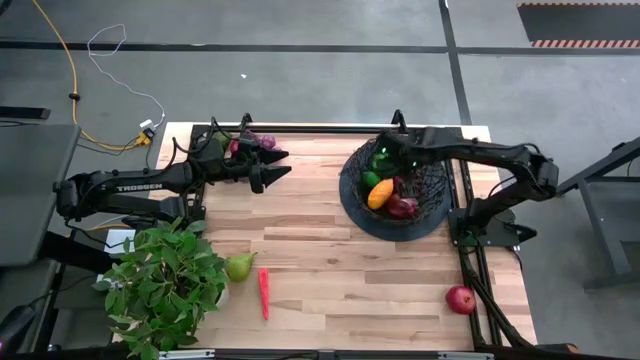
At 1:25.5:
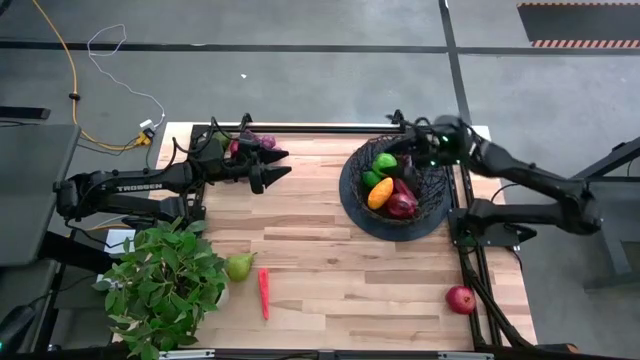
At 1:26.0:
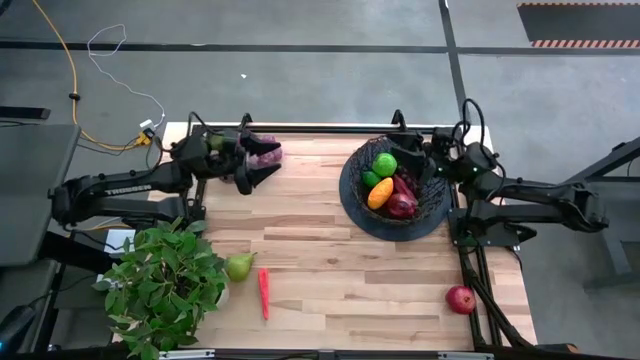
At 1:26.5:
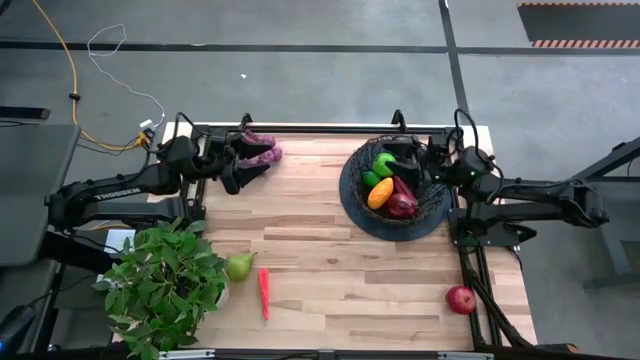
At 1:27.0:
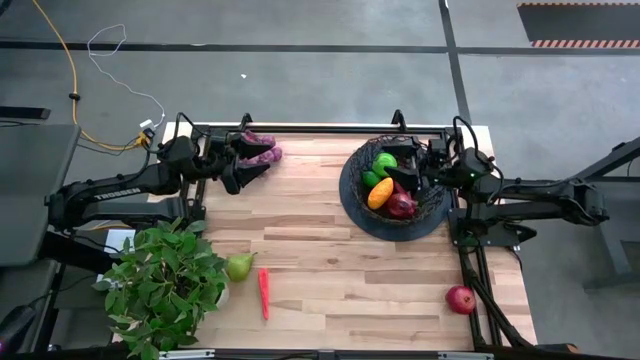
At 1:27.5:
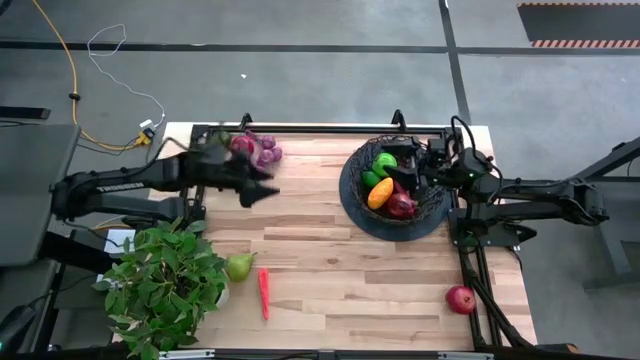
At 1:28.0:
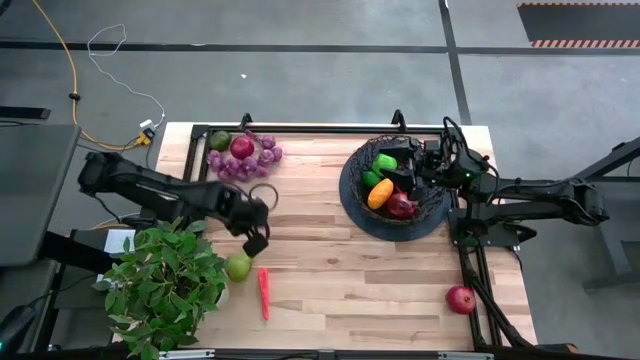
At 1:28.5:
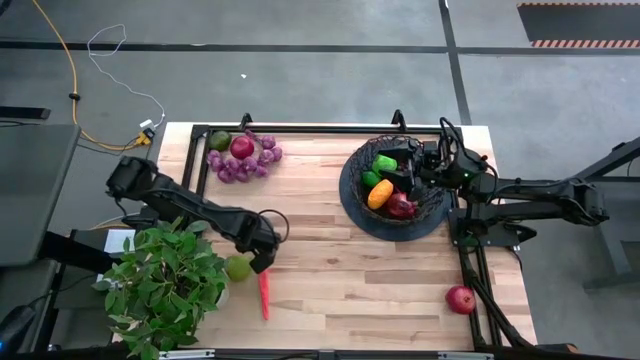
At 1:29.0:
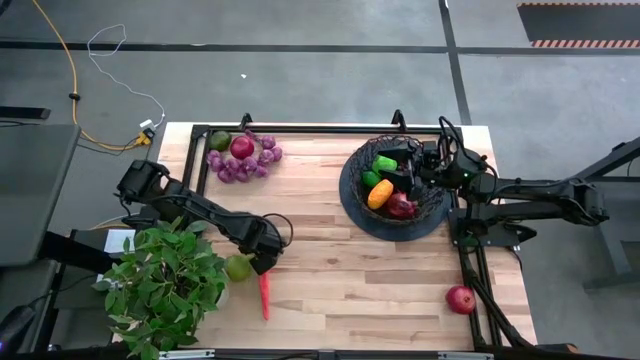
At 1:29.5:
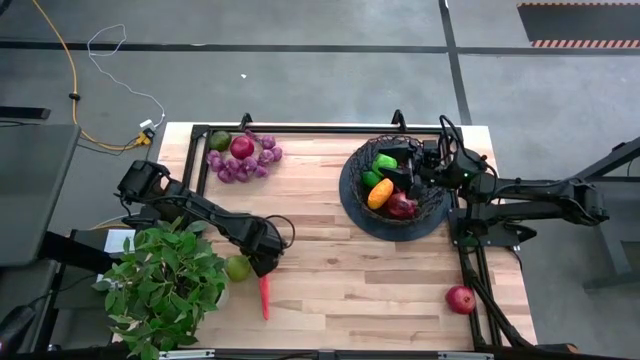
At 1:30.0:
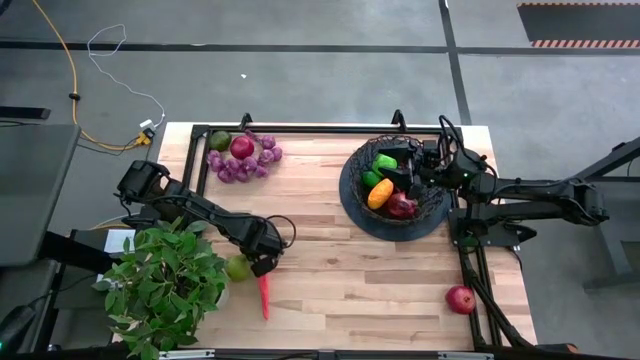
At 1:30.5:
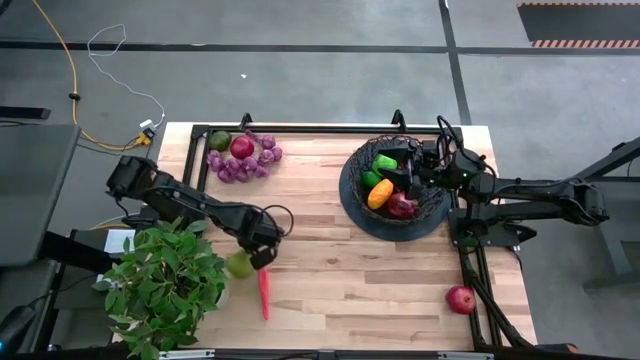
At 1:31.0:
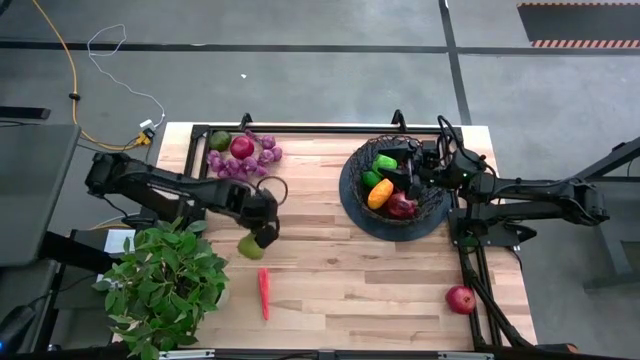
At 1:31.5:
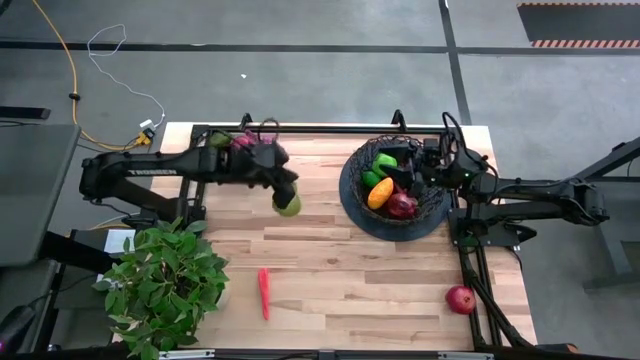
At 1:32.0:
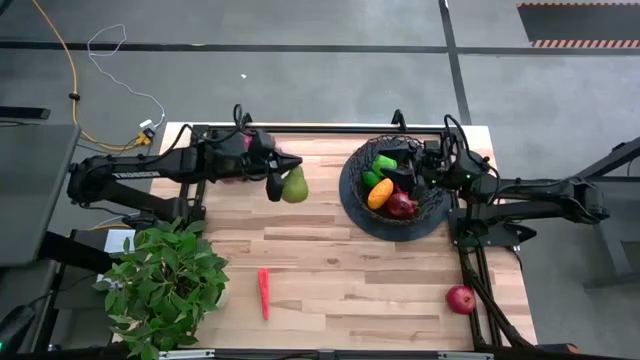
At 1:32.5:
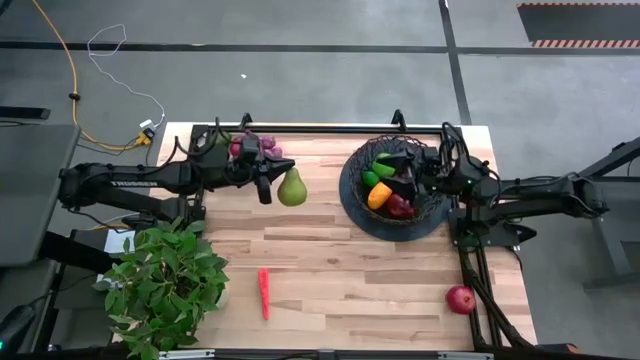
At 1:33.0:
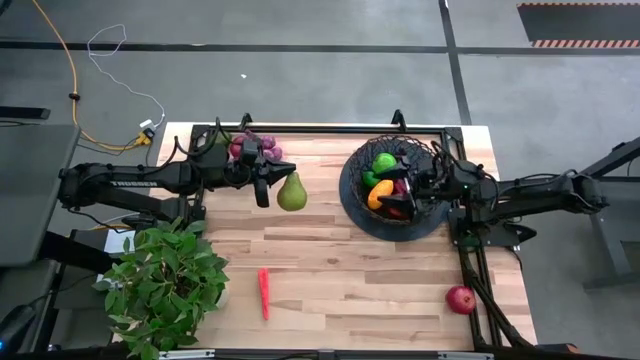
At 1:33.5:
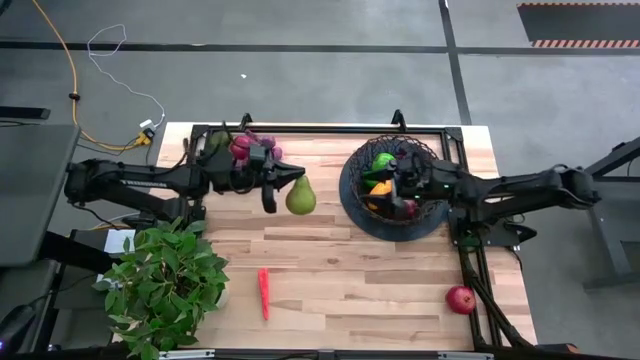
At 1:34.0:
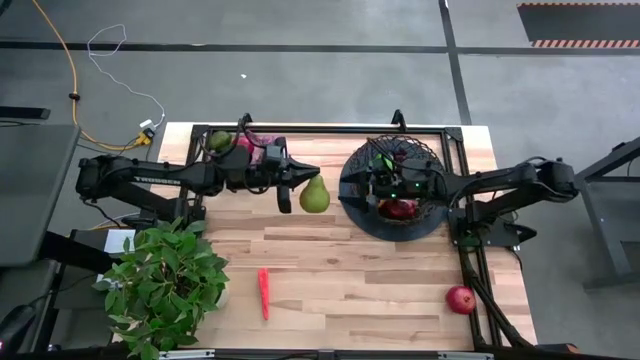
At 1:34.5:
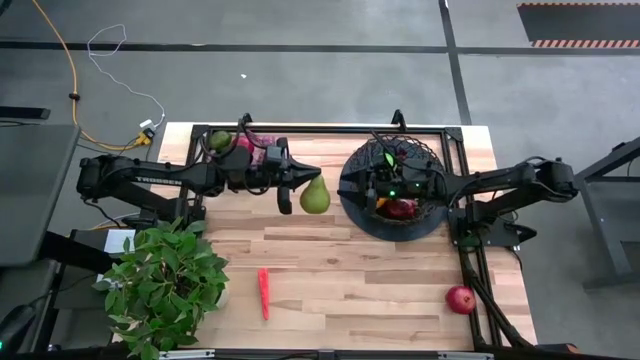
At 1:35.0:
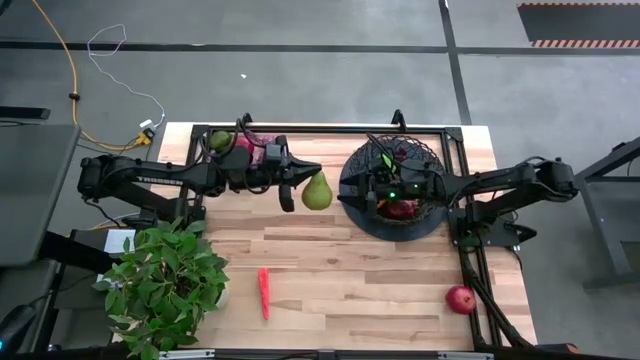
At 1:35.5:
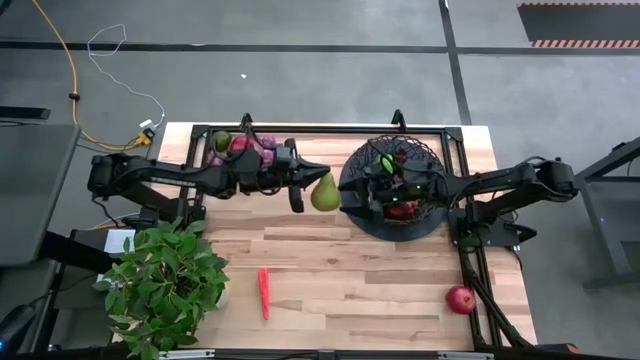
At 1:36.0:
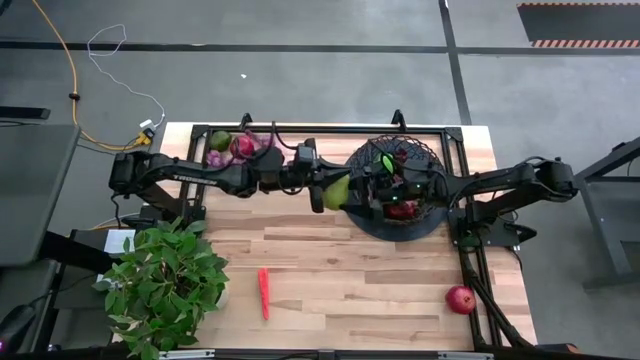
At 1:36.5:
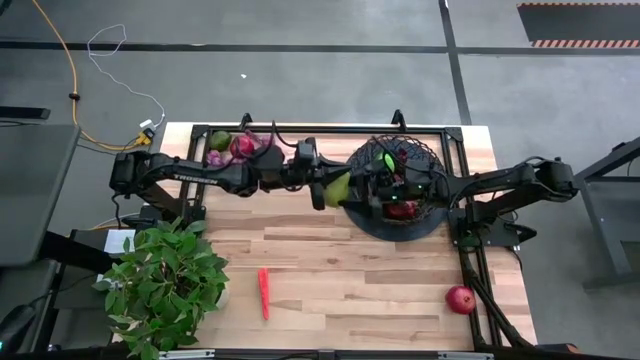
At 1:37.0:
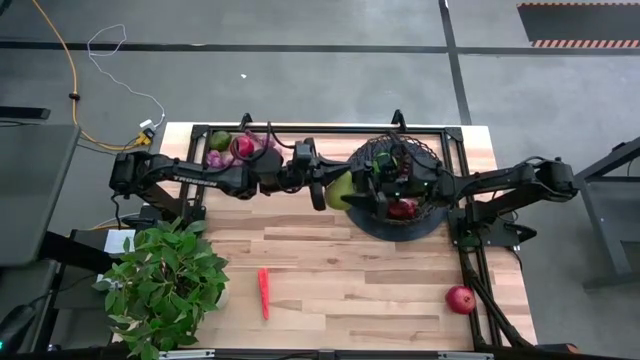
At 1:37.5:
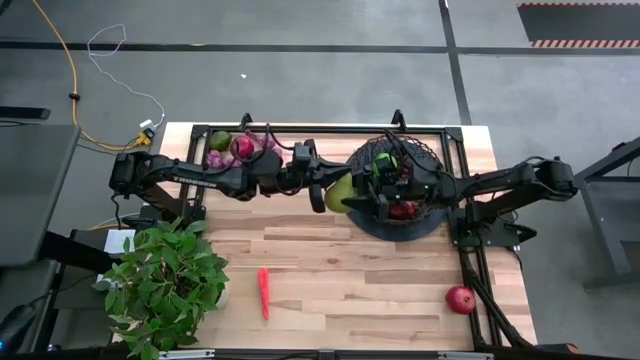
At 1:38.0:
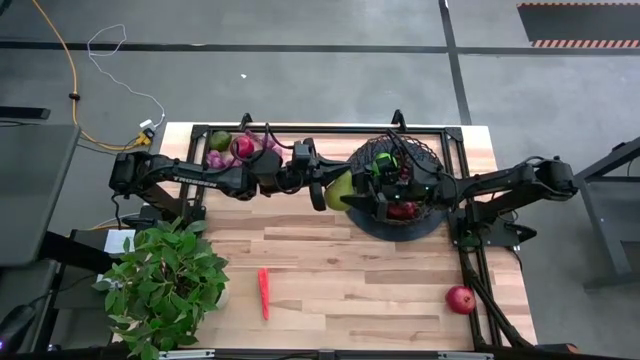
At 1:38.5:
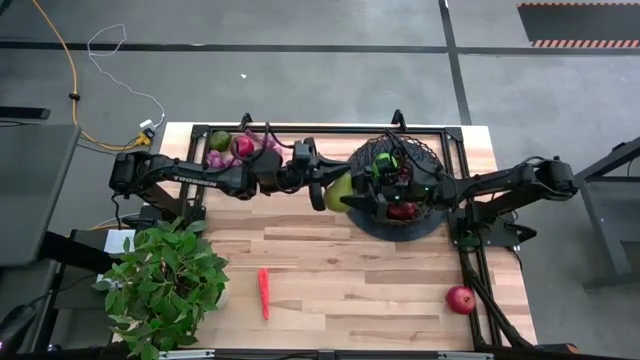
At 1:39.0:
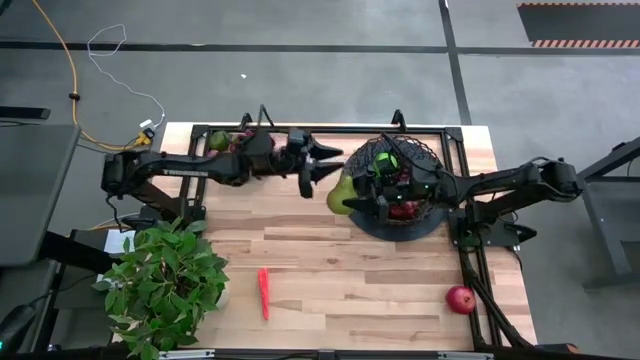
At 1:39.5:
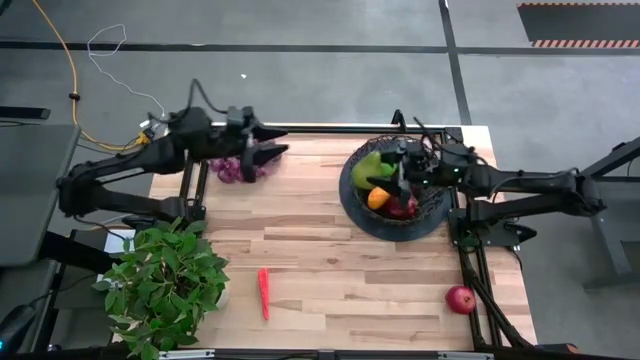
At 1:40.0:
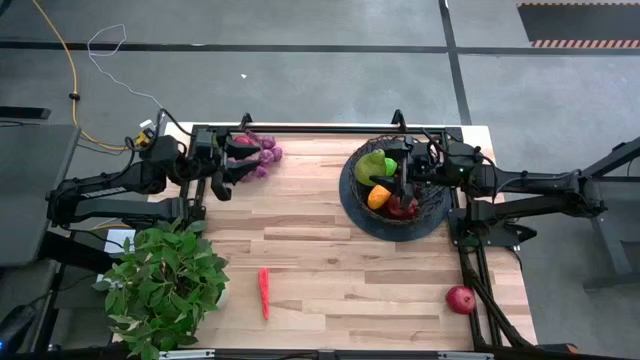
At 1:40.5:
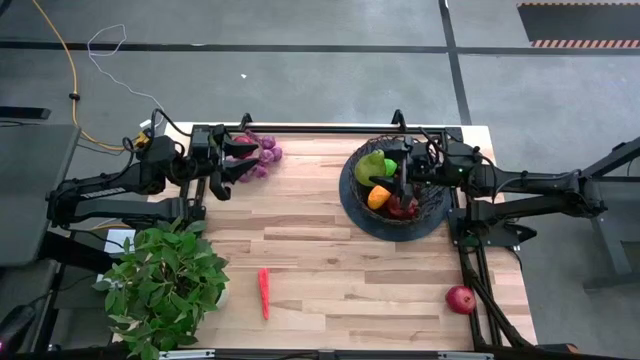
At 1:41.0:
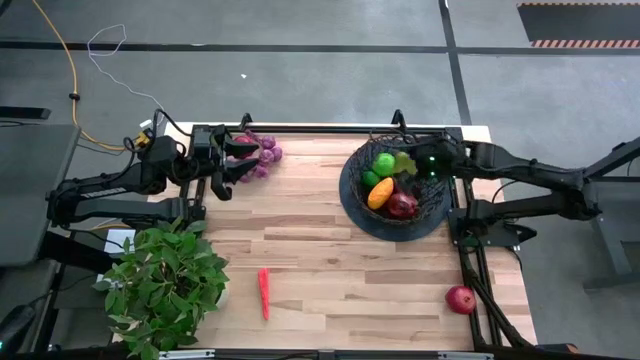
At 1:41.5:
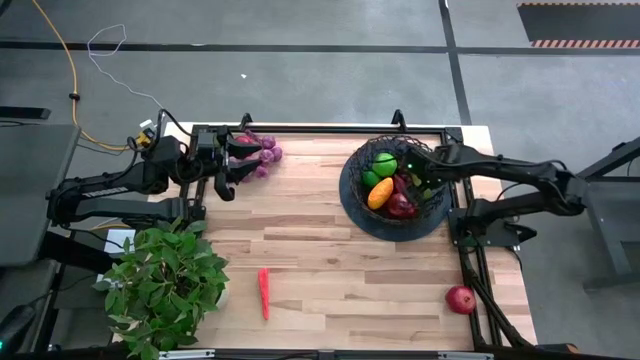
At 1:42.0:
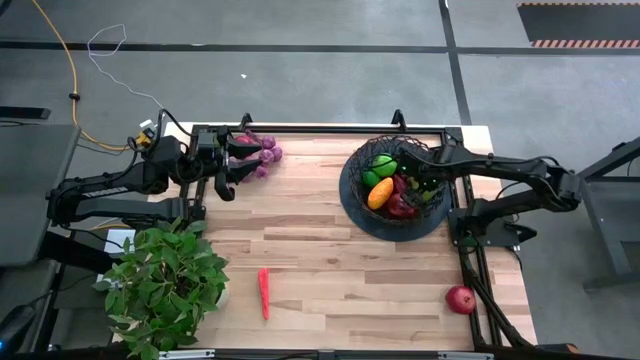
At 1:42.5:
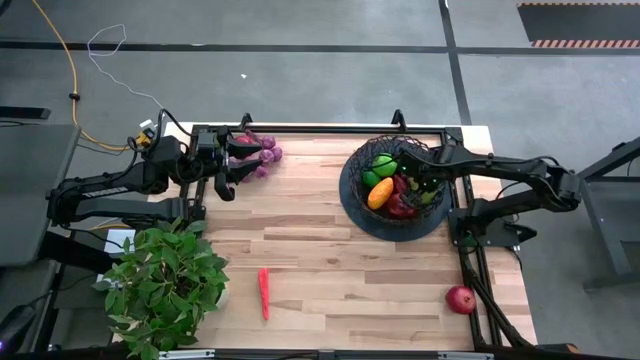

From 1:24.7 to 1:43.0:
Task: Build produce basket
Put the green pear into the black wire basket

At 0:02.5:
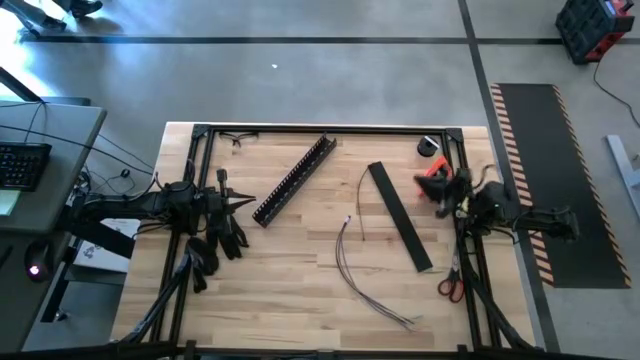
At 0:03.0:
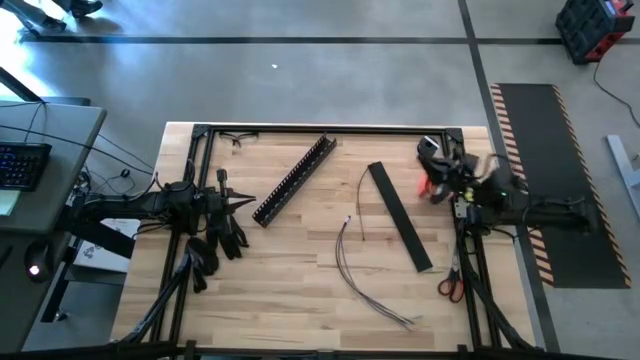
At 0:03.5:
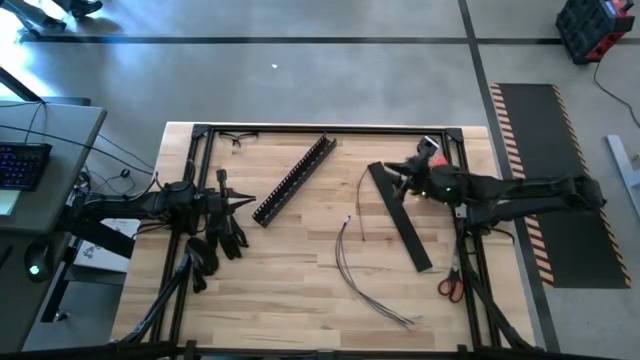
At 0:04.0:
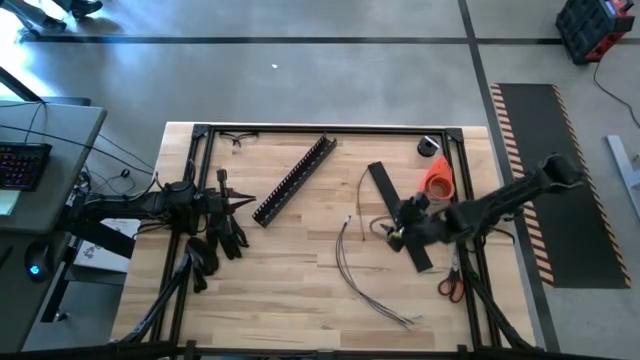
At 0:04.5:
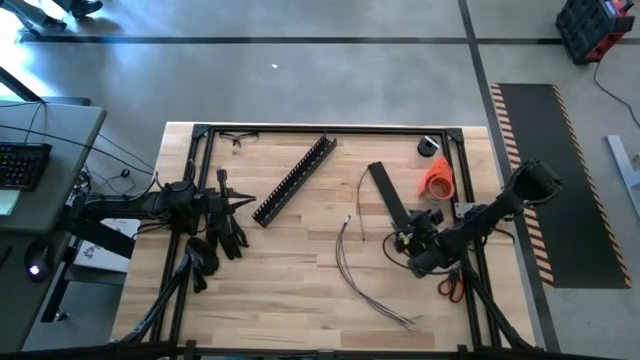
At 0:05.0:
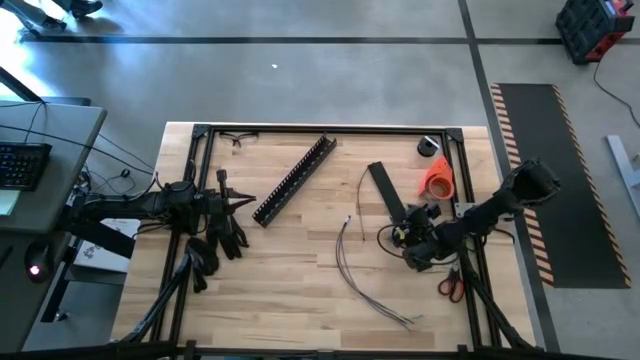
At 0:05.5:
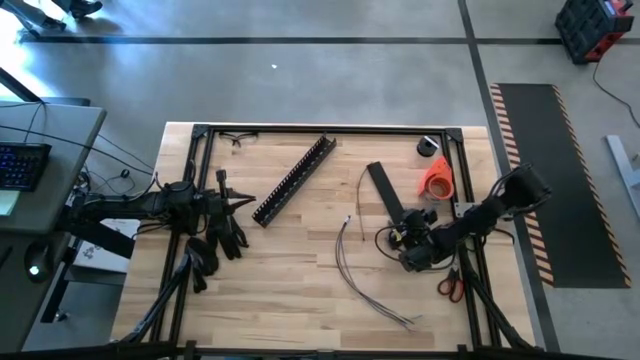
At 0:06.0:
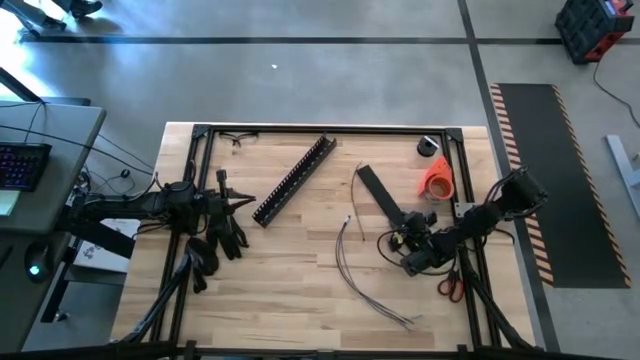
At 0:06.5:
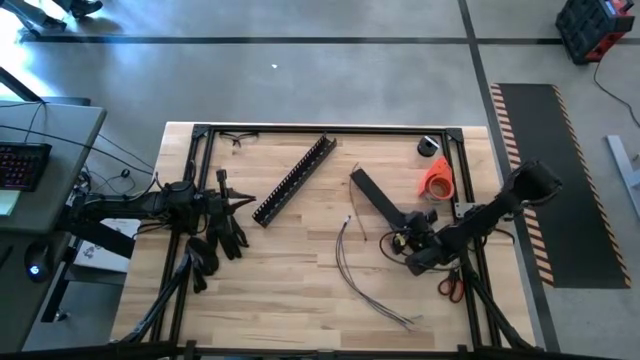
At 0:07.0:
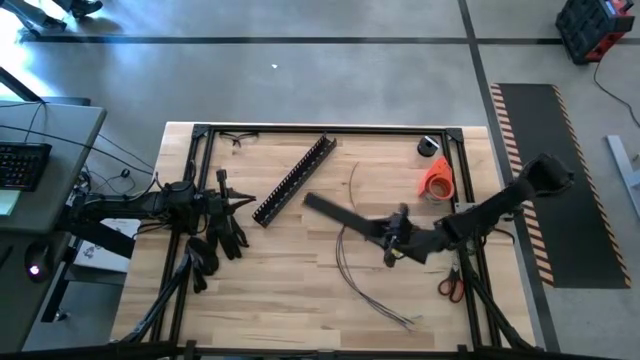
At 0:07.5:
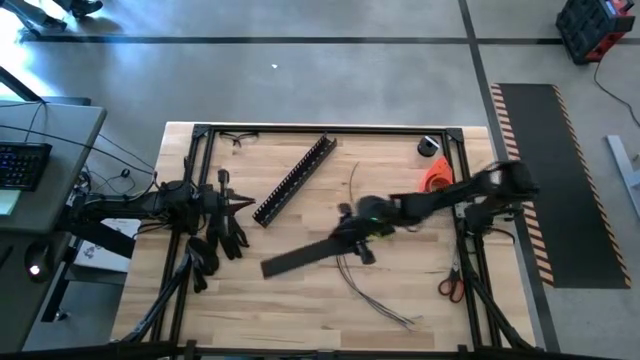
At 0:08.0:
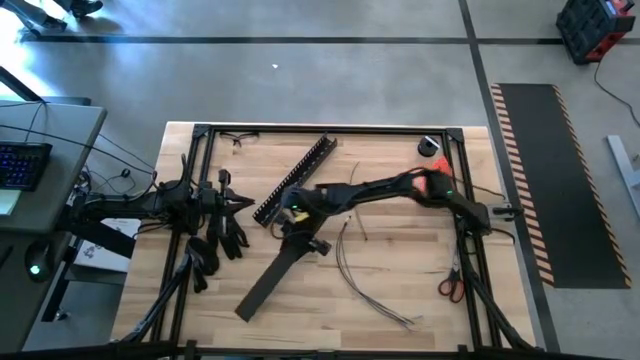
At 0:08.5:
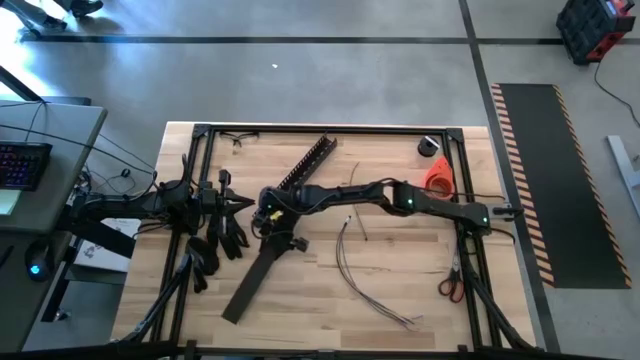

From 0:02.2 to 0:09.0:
Task: Ziptie cables
Move the black cable duct cover to the left of the table
